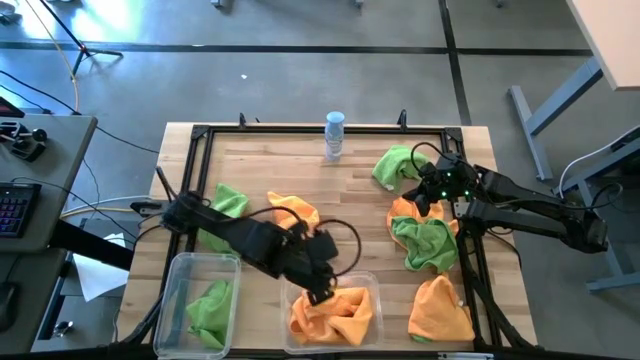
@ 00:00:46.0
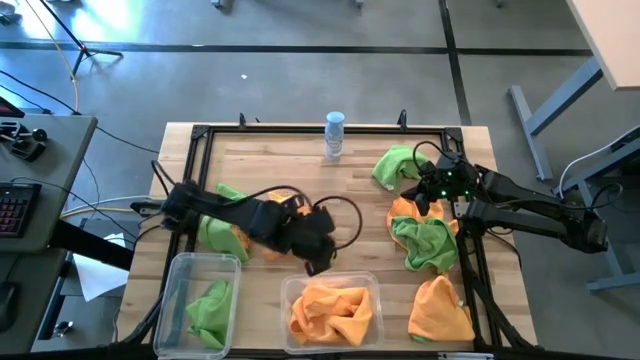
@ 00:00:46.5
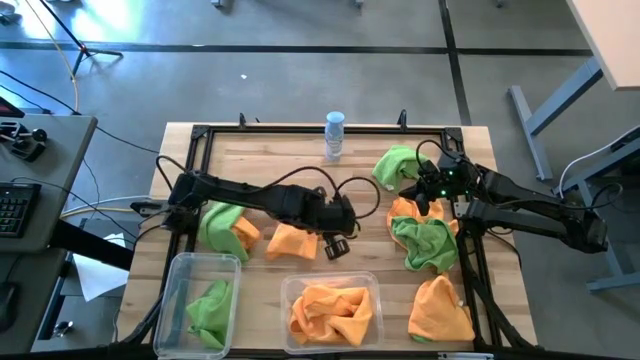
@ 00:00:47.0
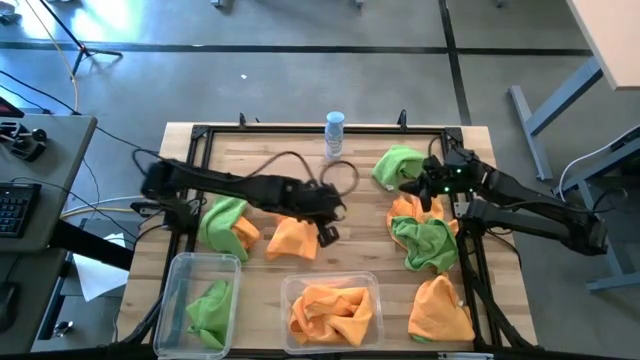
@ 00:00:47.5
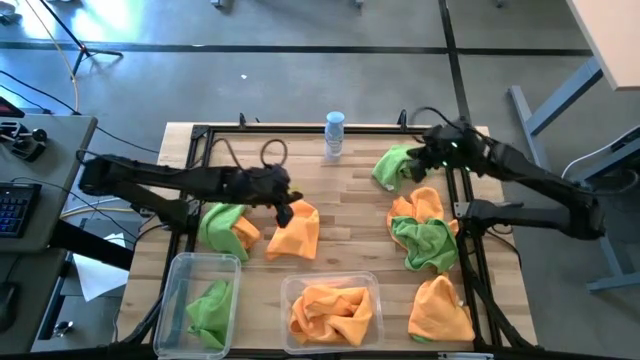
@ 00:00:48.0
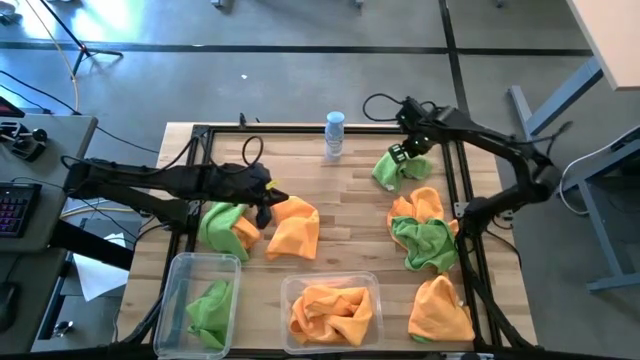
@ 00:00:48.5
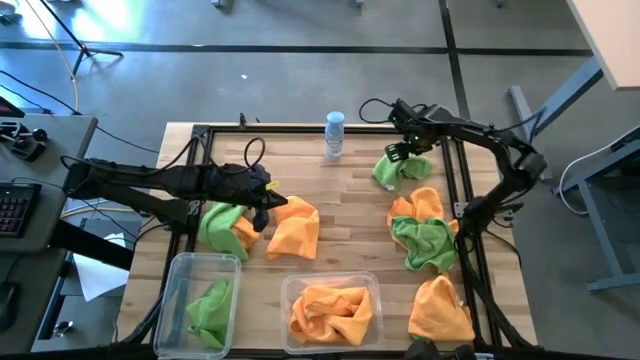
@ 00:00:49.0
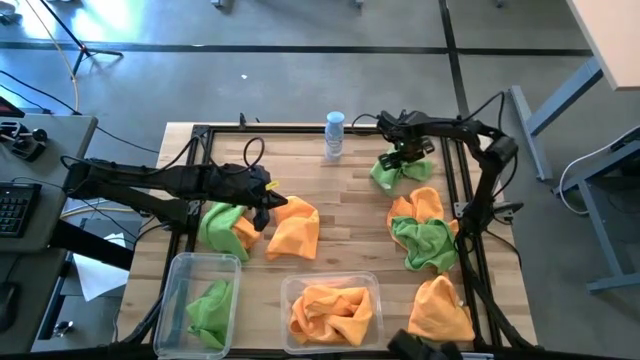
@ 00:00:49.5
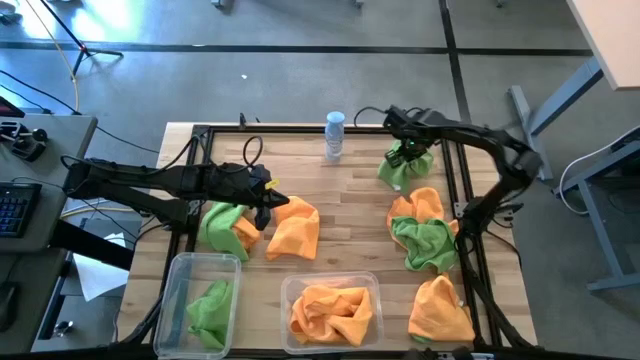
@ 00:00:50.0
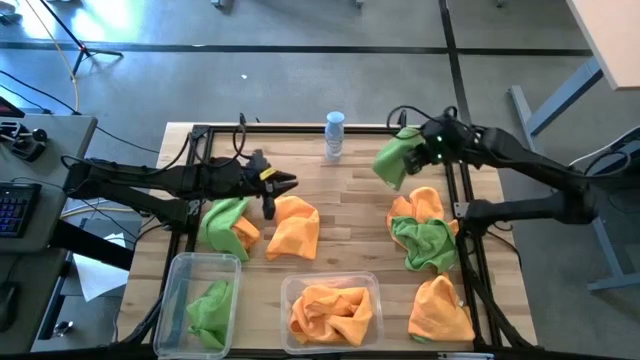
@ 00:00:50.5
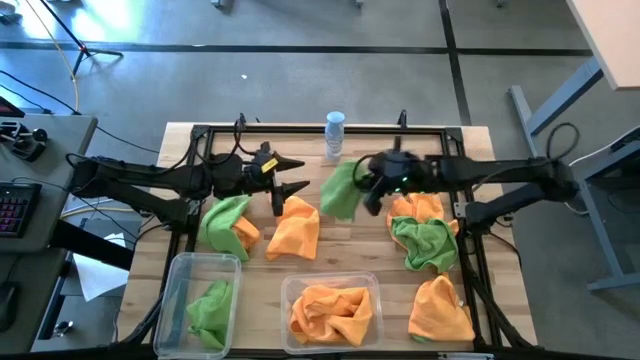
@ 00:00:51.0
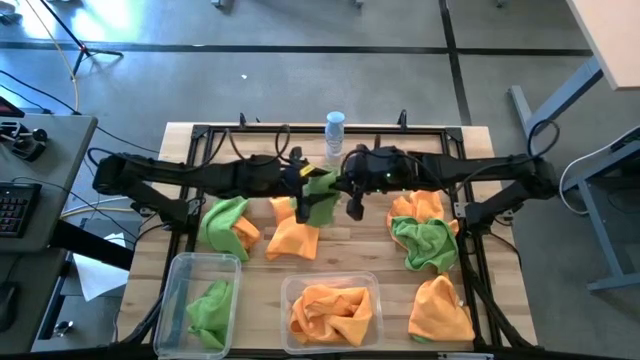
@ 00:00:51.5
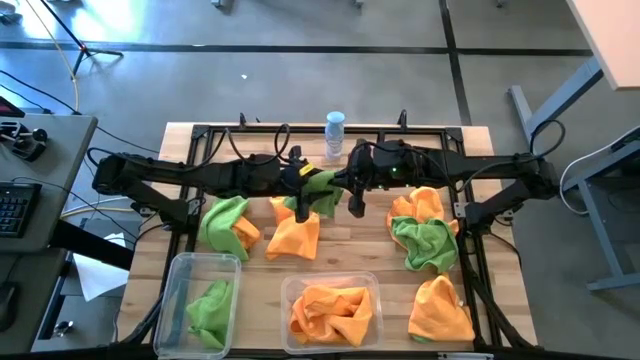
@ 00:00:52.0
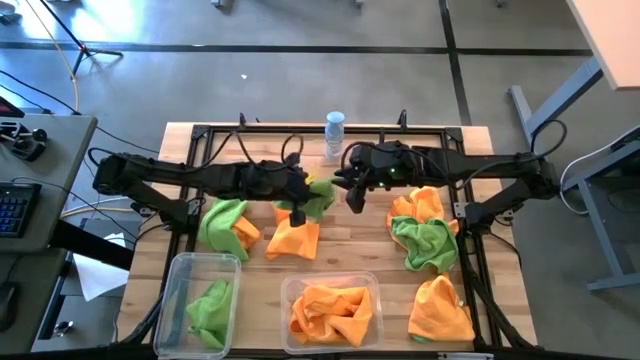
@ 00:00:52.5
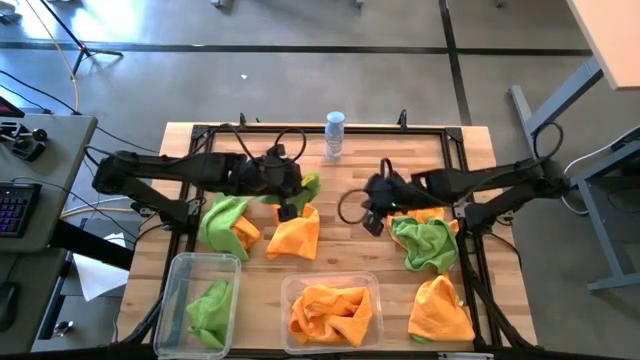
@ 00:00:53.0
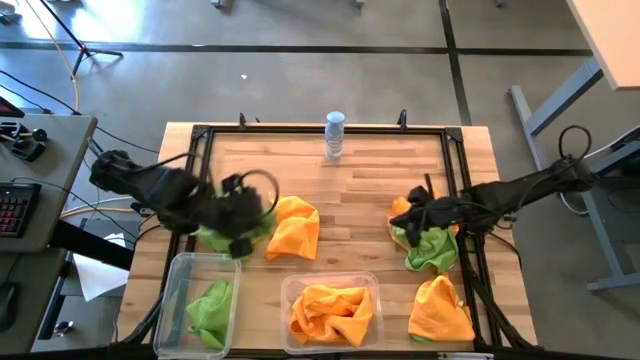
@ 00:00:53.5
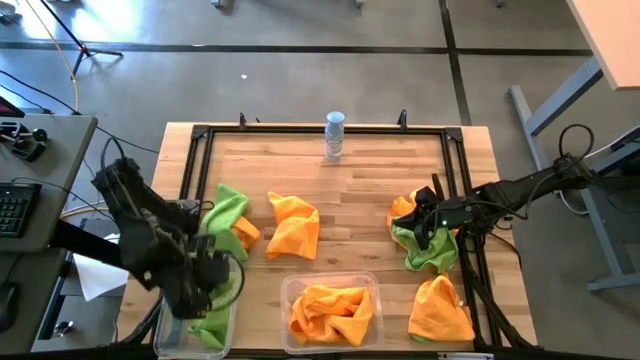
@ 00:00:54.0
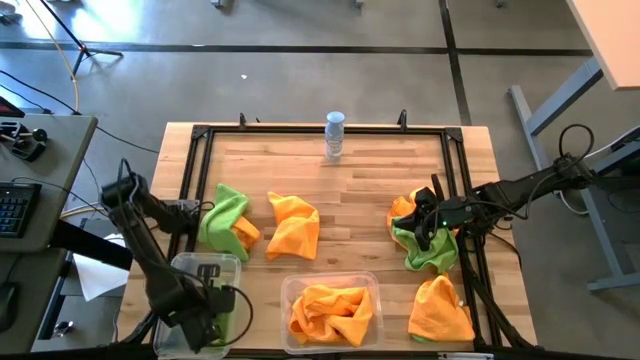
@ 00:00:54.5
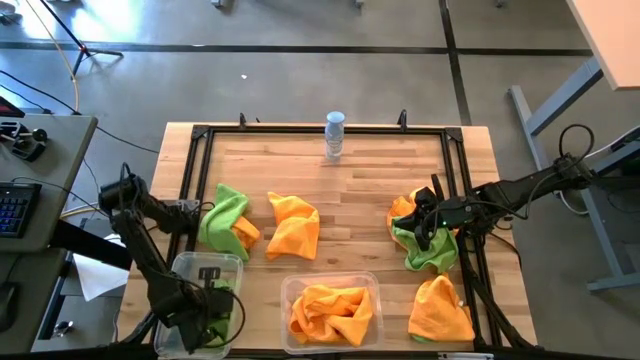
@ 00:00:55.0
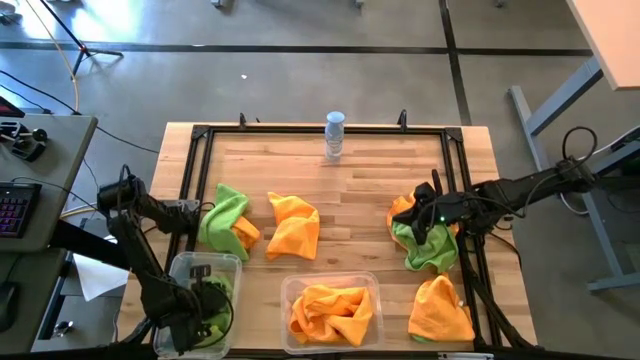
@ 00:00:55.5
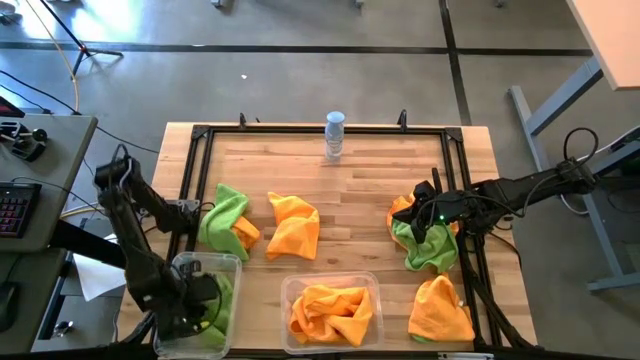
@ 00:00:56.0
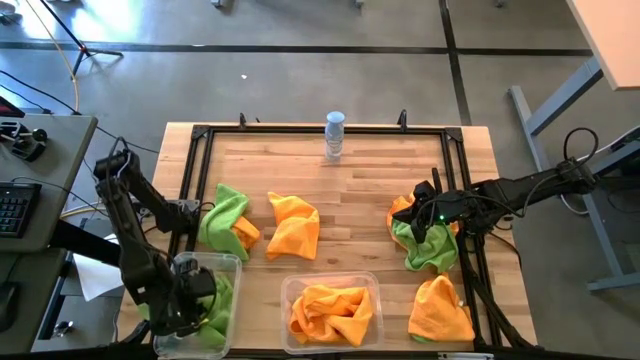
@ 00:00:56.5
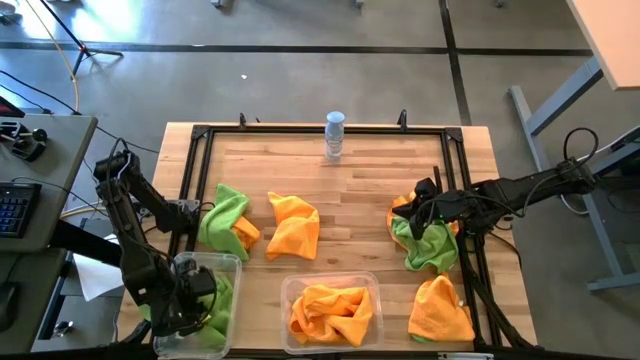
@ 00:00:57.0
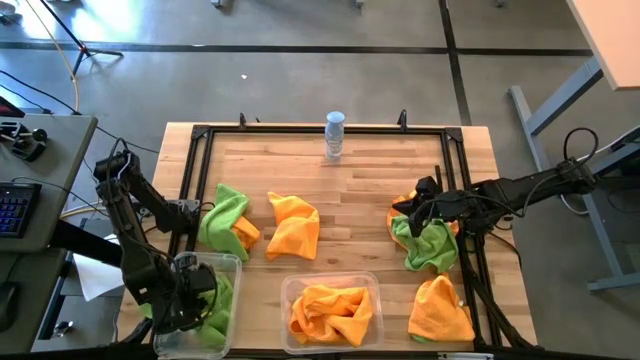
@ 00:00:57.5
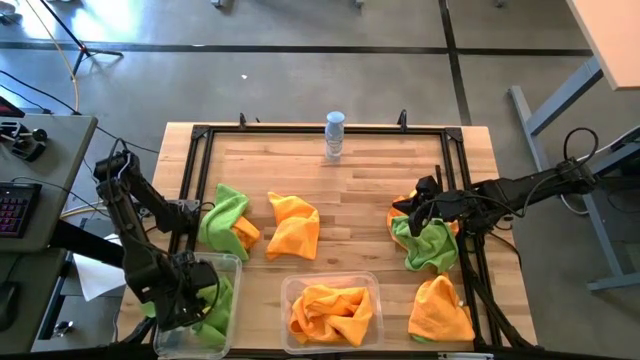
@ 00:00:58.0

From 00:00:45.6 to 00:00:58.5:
Task: Sort microfiber towel by color & place in baskets
Put the green microfiber towel into the left transparent bin

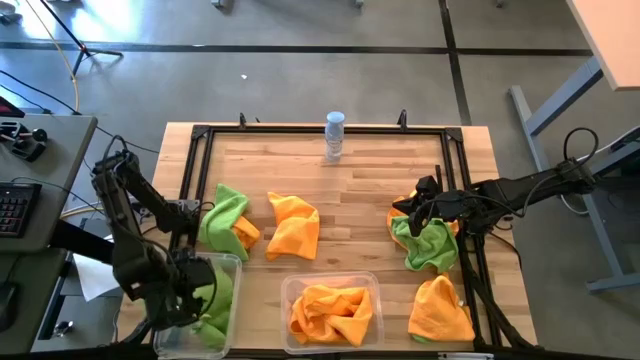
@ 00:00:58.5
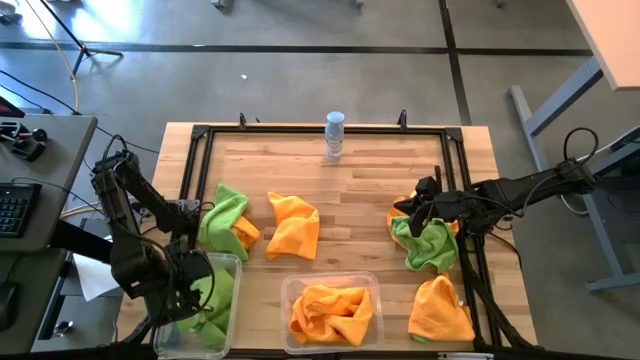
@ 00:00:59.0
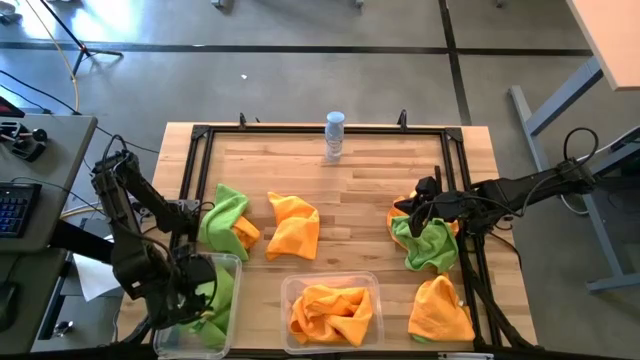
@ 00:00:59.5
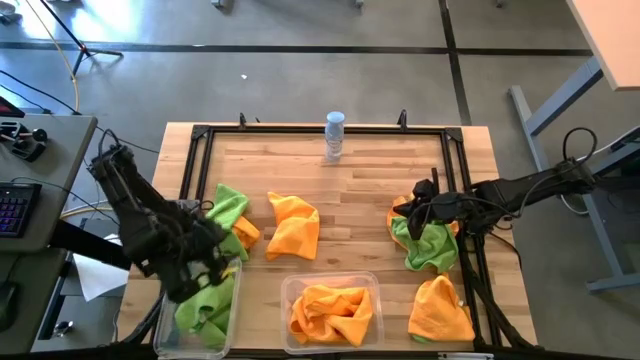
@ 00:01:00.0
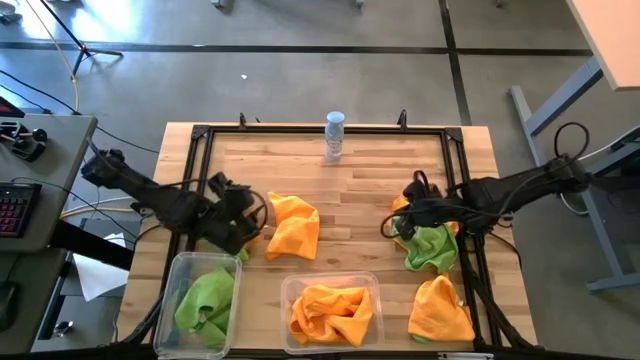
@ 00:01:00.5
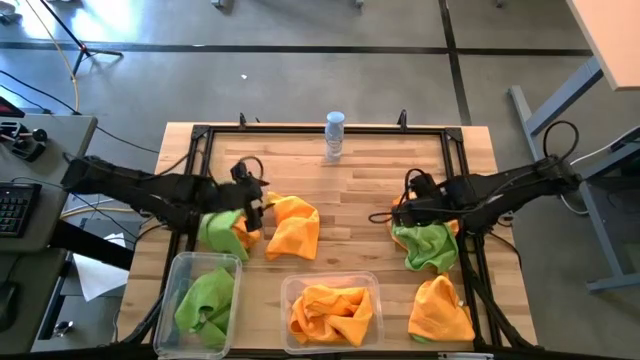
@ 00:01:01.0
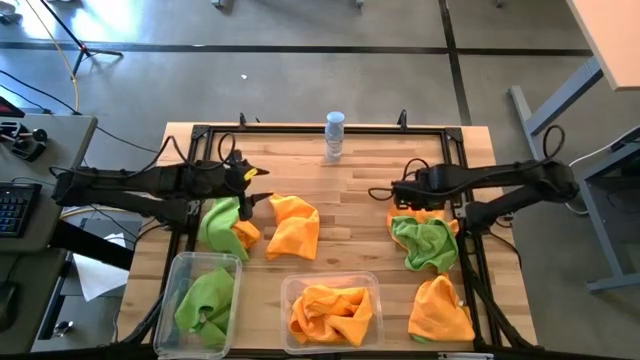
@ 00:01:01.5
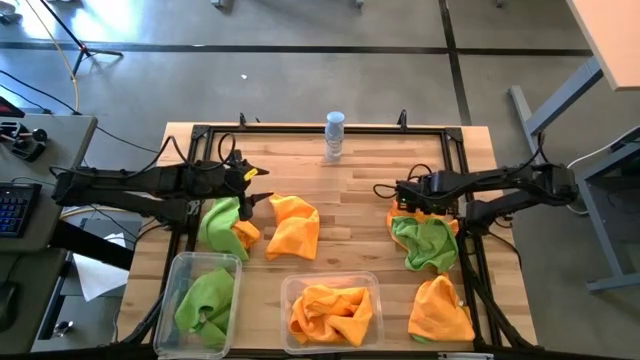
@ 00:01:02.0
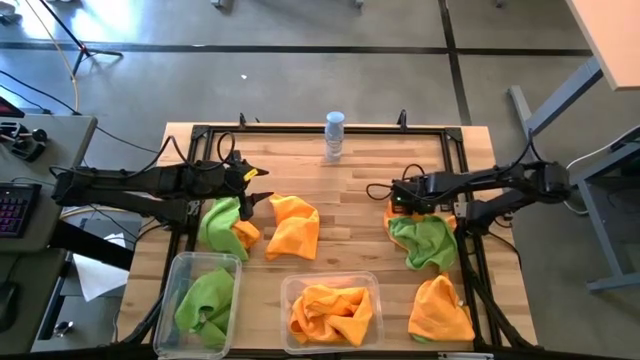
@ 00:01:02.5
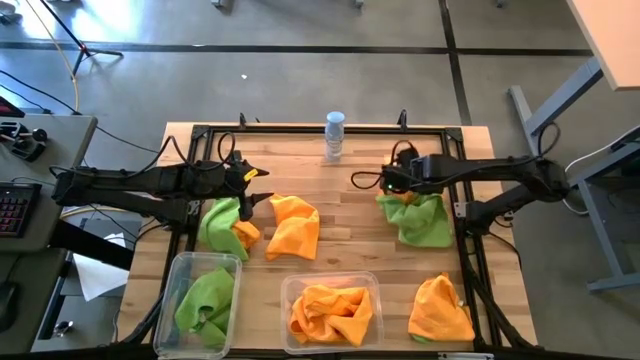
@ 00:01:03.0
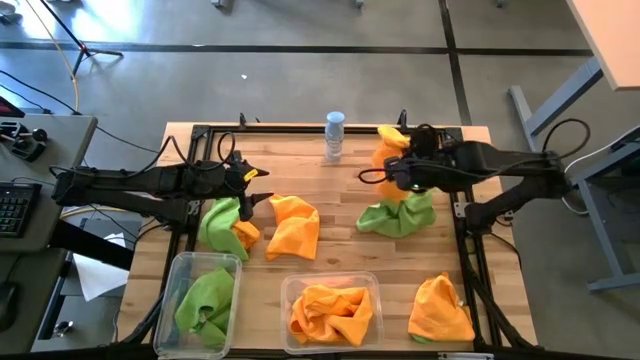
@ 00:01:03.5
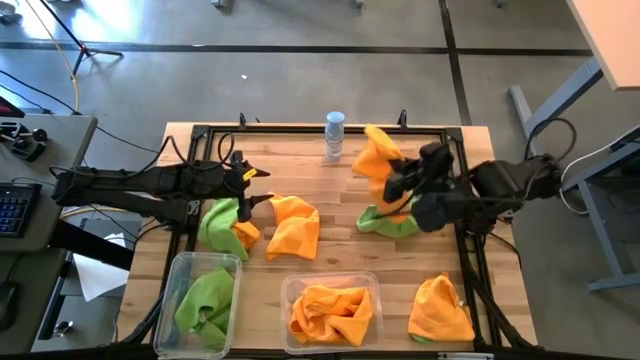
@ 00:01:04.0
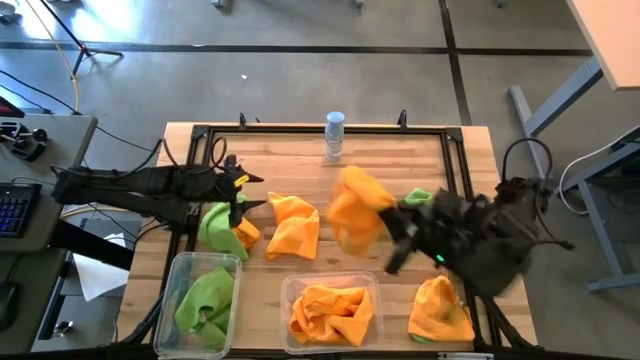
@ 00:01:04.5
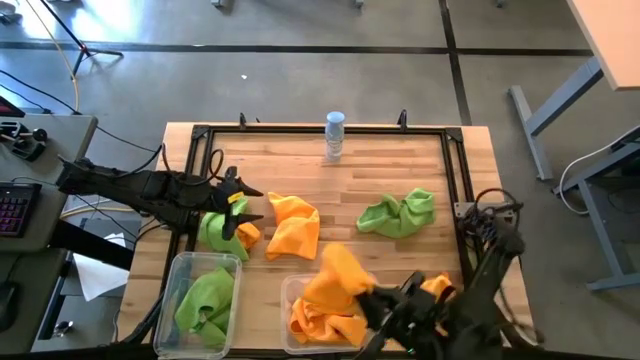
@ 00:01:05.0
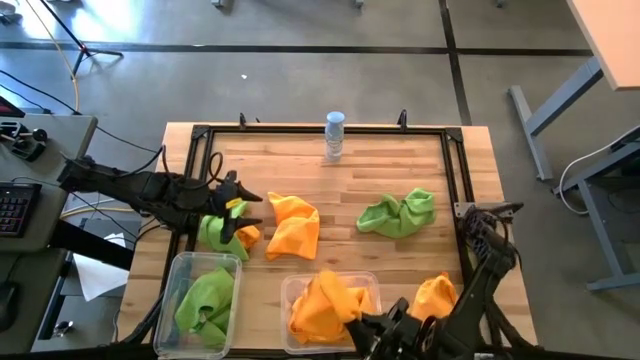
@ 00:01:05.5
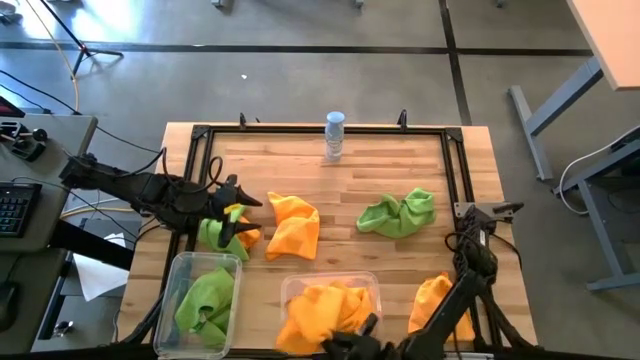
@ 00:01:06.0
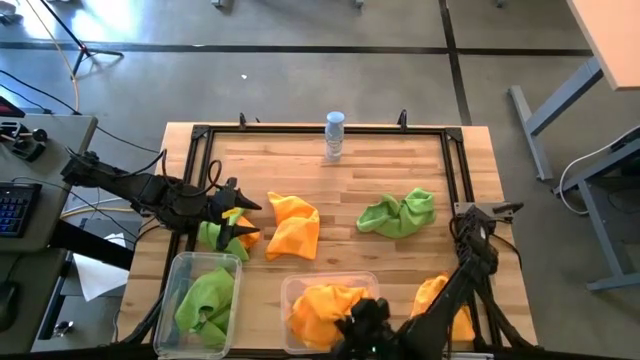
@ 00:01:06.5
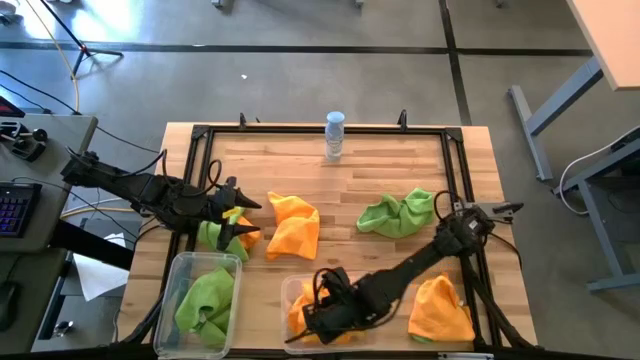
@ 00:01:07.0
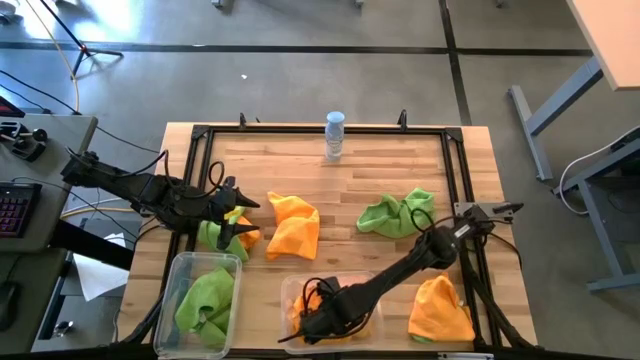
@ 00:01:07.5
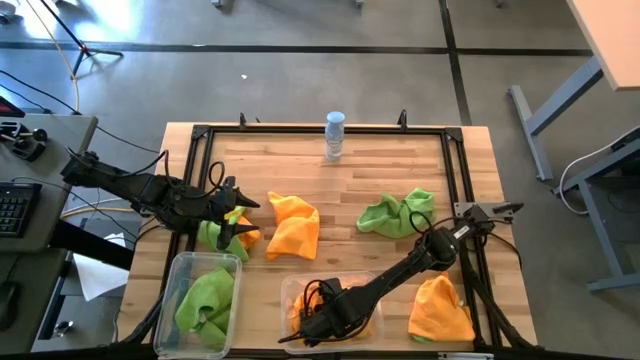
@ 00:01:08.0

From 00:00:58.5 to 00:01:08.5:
Put the orange microfiber towel into the right transparent bin
